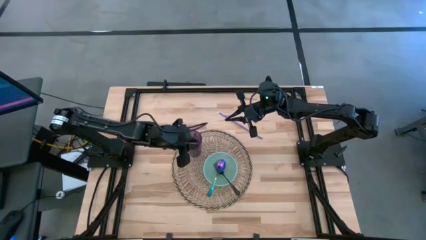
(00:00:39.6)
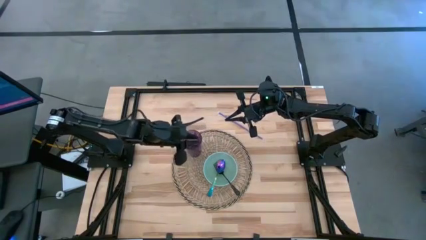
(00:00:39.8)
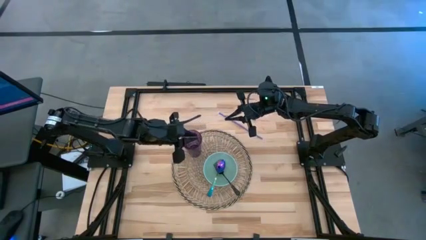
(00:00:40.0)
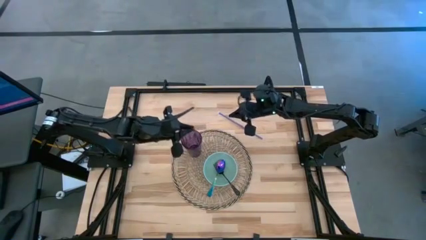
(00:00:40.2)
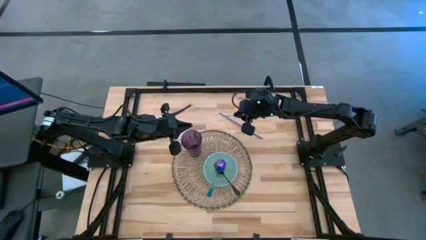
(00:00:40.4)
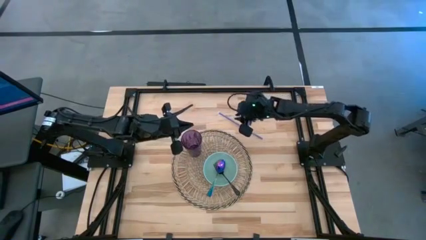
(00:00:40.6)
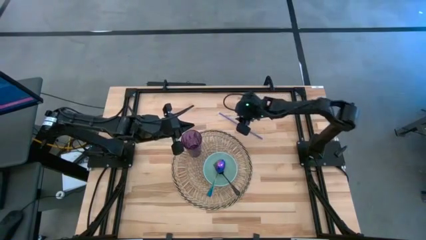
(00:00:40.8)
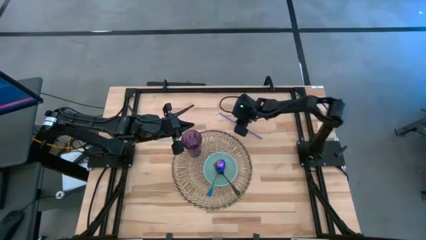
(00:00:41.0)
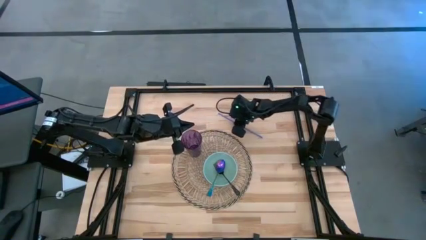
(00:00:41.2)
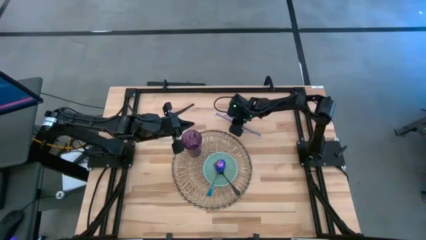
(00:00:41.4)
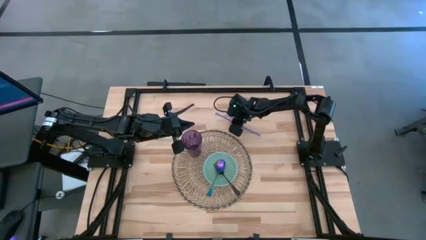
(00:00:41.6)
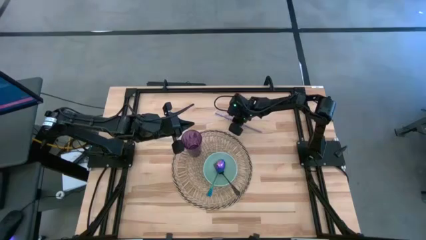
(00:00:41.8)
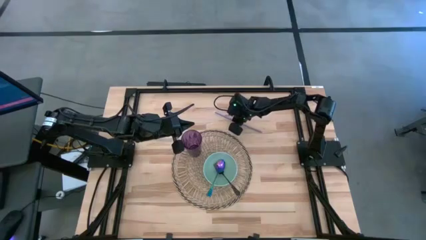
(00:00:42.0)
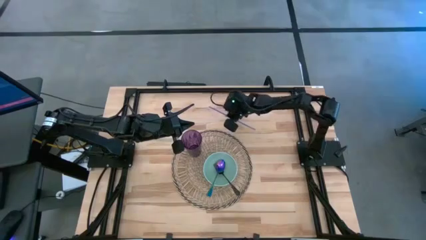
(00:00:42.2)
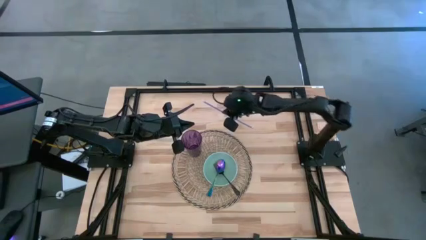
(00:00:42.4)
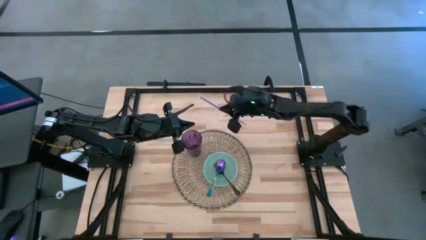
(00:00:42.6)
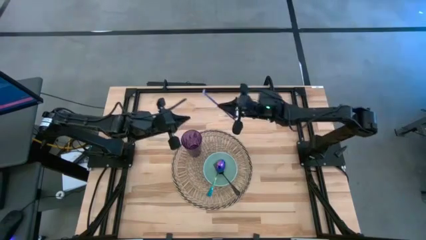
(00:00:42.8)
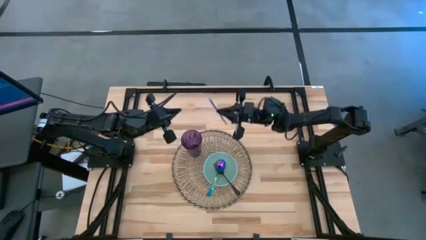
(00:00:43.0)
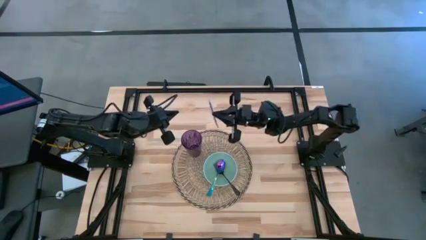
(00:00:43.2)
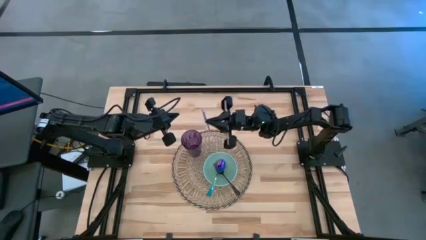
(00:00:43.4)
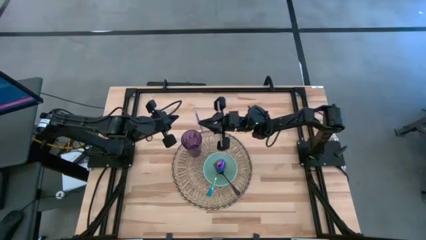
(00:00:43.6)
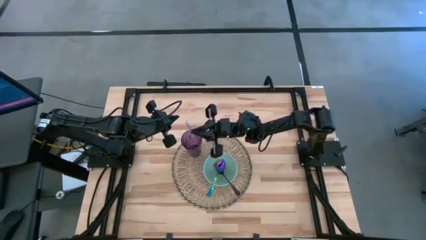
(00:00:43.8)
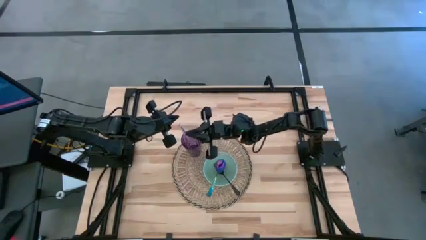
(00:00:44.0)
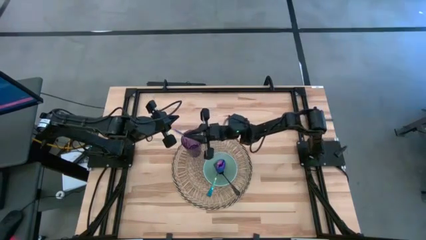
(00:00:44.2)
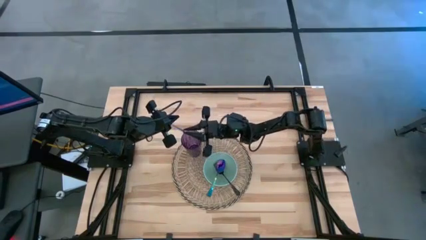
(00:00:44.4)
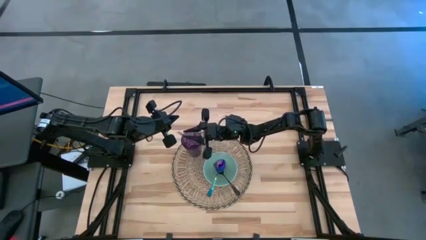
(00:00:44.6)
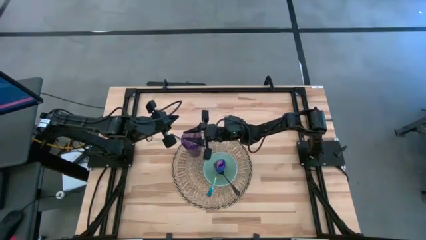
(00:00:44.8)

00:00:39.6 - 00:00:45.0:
Task: Pick & Place Utensil
Put the purple straw into the purple glass cup on the table placemat

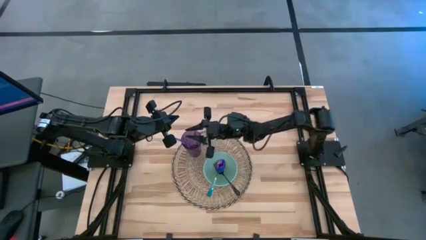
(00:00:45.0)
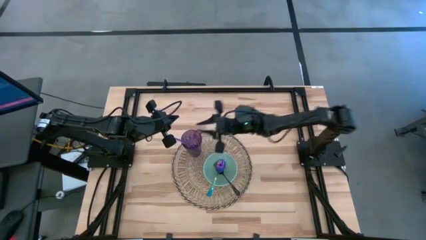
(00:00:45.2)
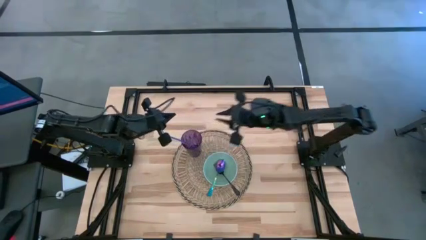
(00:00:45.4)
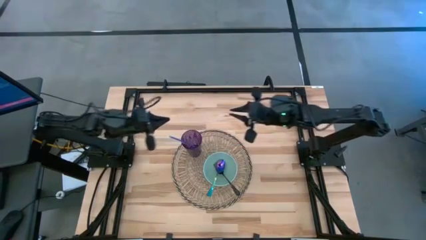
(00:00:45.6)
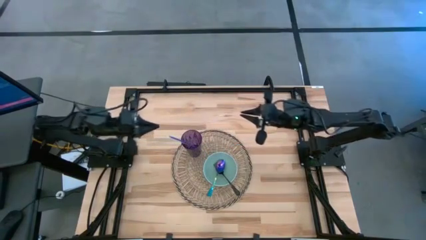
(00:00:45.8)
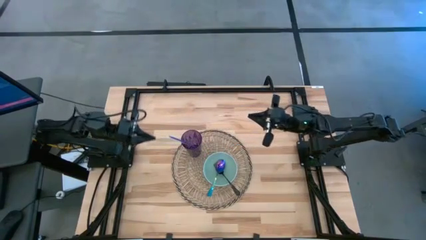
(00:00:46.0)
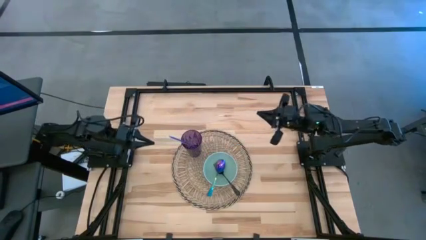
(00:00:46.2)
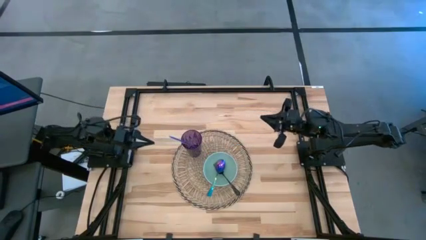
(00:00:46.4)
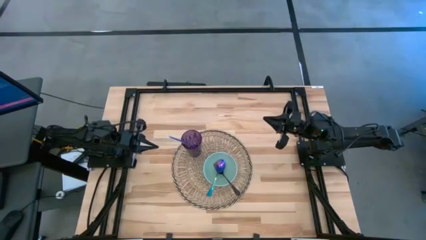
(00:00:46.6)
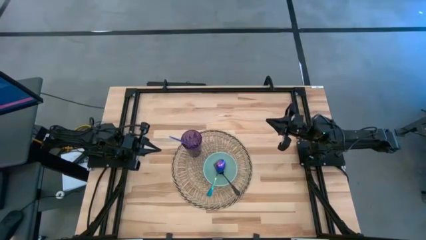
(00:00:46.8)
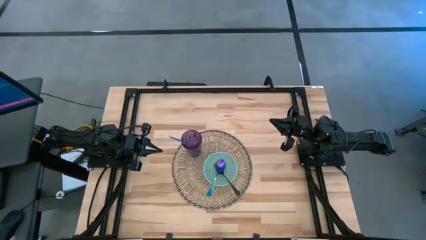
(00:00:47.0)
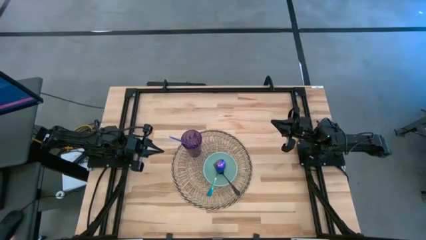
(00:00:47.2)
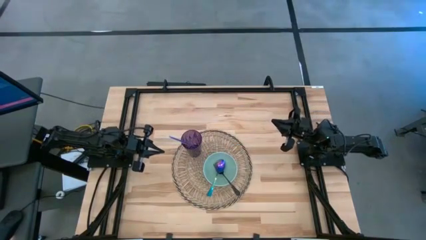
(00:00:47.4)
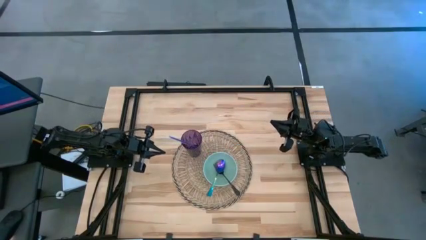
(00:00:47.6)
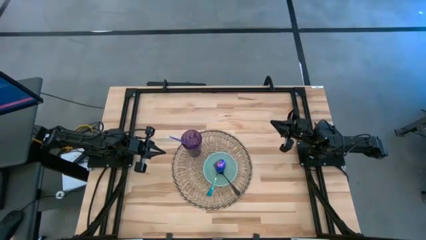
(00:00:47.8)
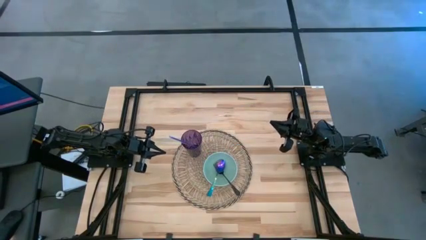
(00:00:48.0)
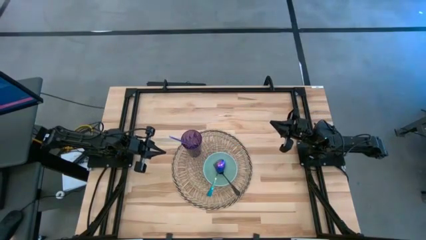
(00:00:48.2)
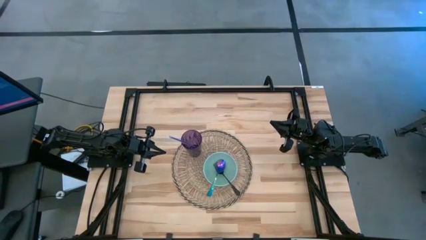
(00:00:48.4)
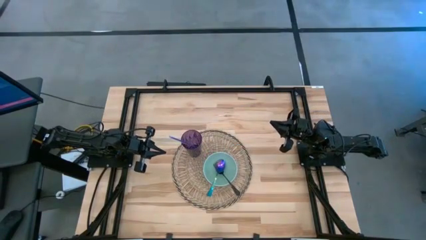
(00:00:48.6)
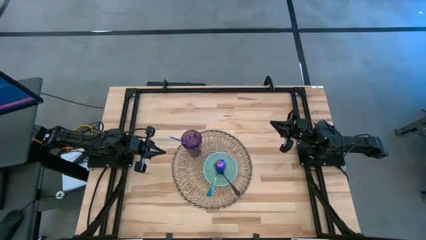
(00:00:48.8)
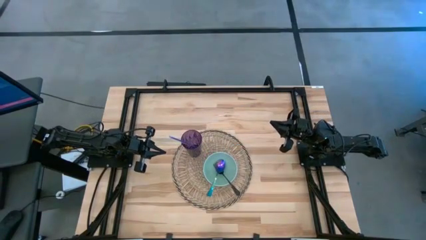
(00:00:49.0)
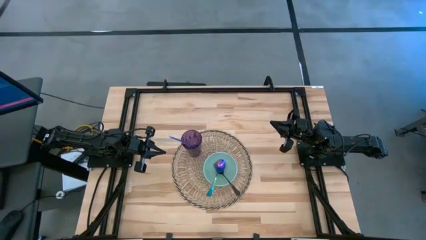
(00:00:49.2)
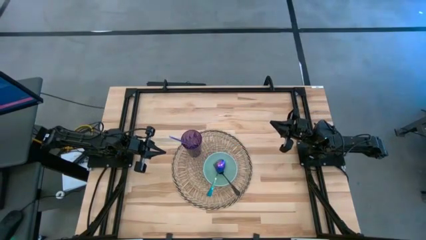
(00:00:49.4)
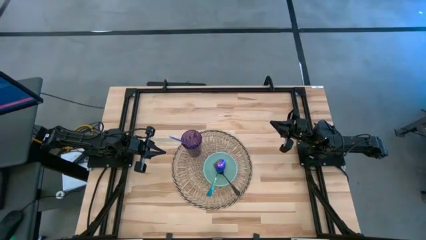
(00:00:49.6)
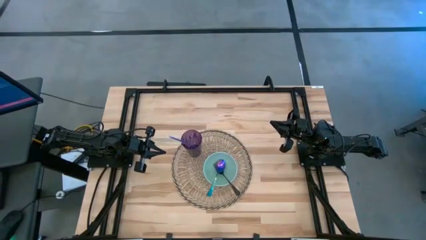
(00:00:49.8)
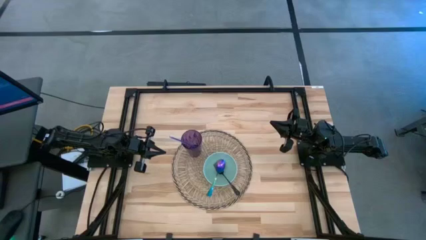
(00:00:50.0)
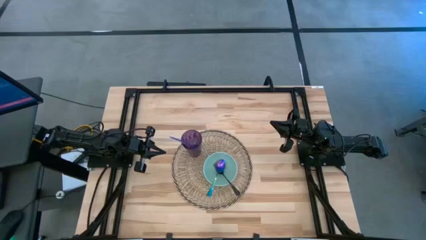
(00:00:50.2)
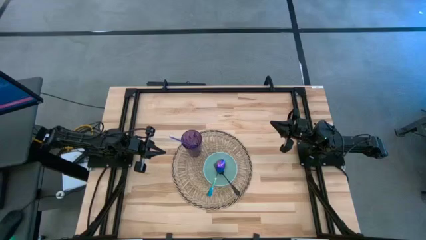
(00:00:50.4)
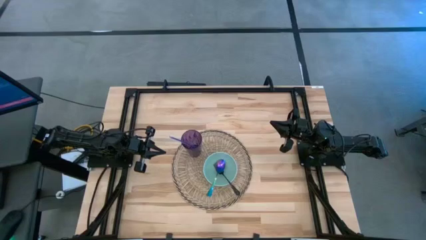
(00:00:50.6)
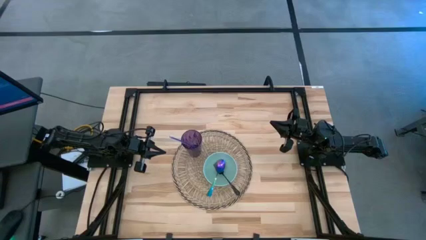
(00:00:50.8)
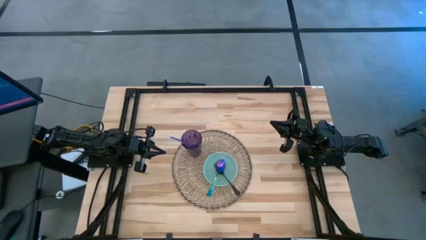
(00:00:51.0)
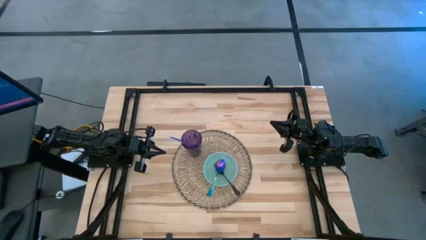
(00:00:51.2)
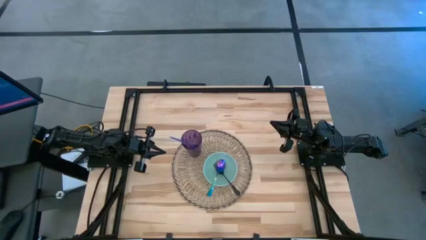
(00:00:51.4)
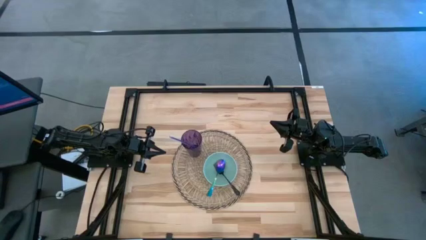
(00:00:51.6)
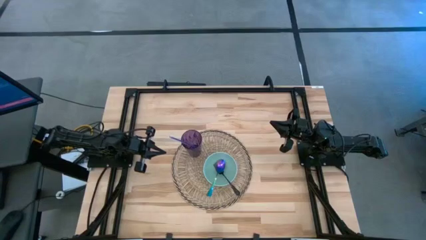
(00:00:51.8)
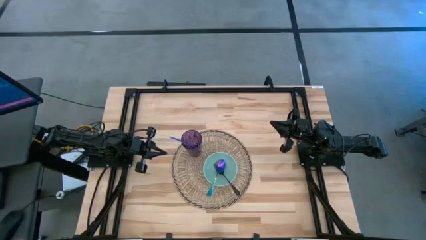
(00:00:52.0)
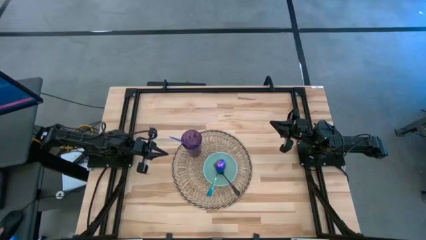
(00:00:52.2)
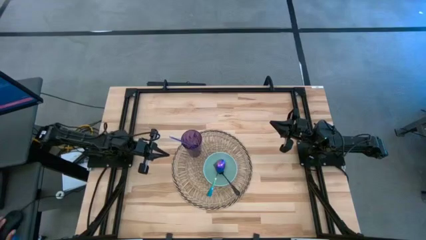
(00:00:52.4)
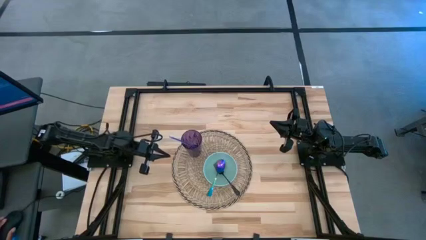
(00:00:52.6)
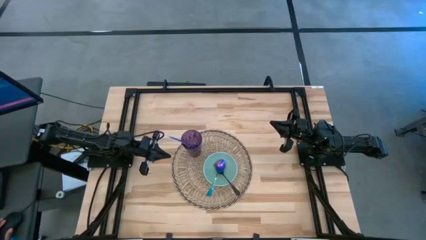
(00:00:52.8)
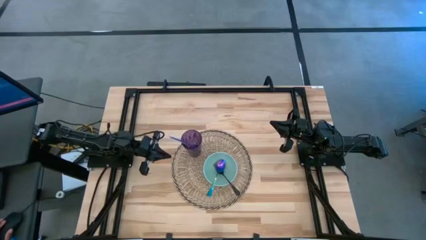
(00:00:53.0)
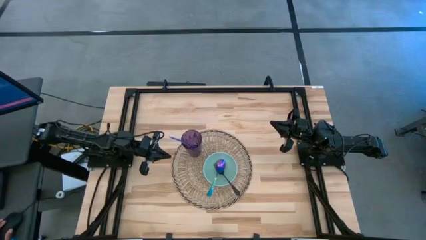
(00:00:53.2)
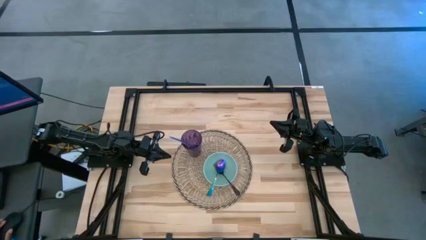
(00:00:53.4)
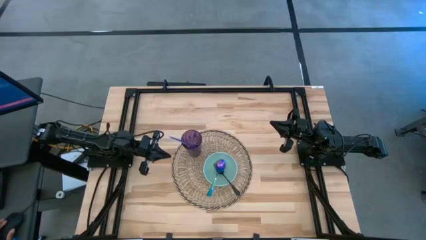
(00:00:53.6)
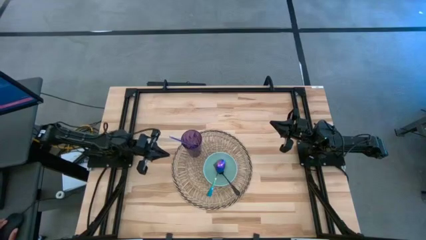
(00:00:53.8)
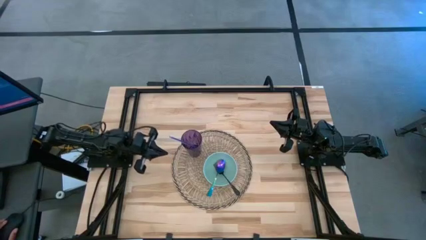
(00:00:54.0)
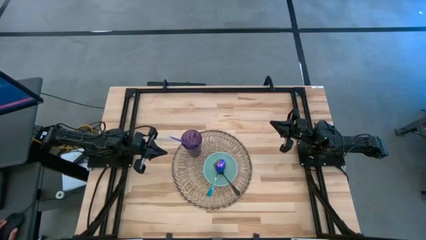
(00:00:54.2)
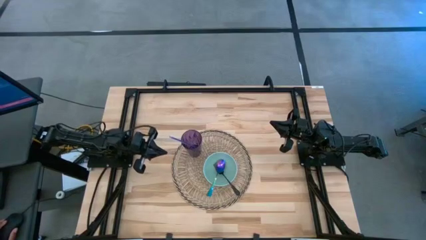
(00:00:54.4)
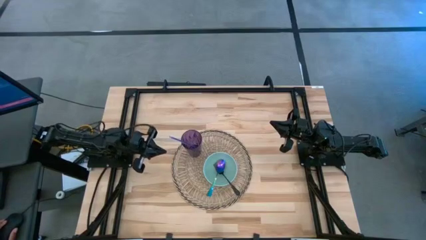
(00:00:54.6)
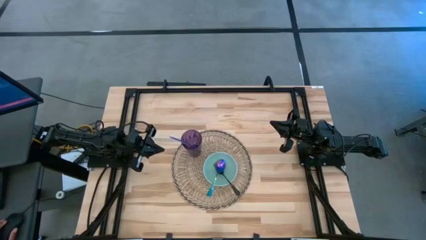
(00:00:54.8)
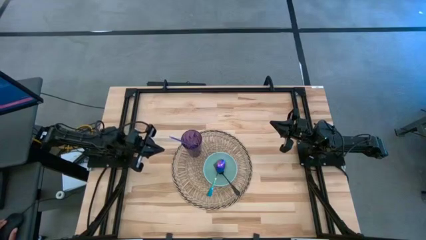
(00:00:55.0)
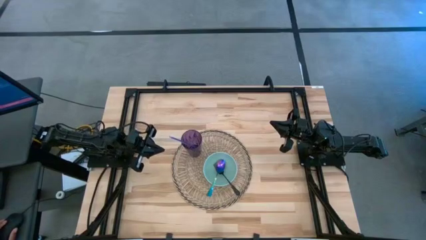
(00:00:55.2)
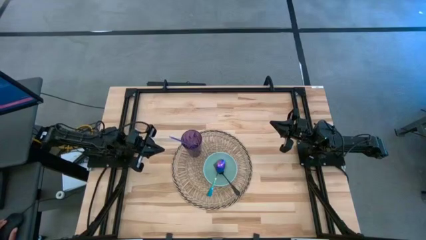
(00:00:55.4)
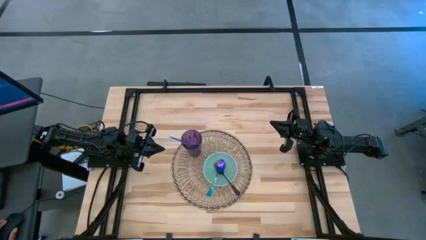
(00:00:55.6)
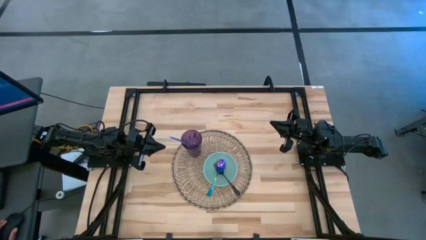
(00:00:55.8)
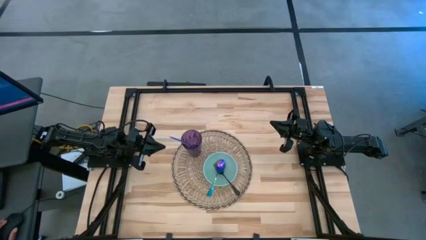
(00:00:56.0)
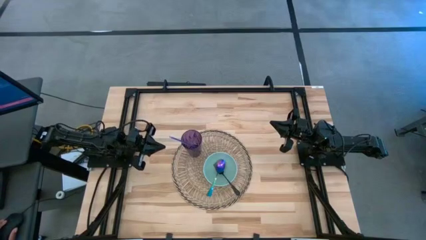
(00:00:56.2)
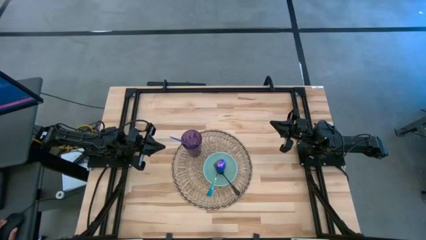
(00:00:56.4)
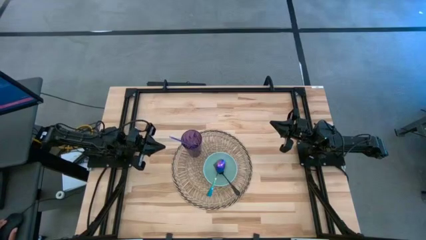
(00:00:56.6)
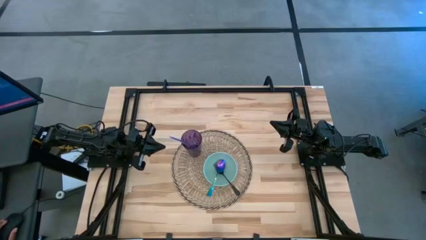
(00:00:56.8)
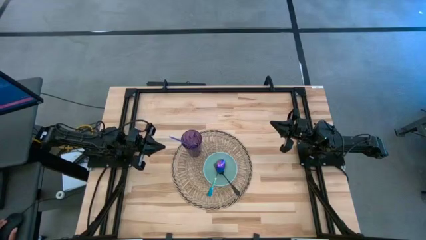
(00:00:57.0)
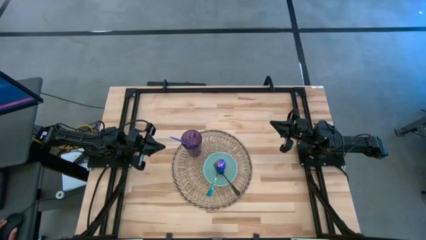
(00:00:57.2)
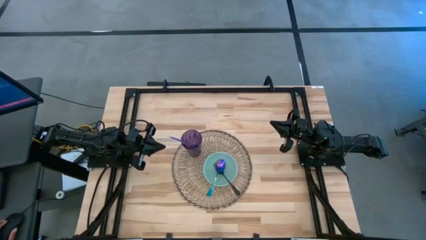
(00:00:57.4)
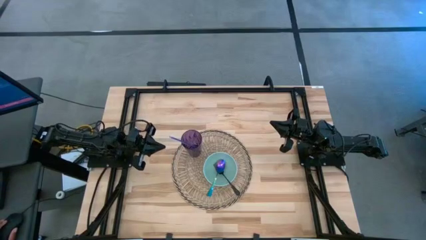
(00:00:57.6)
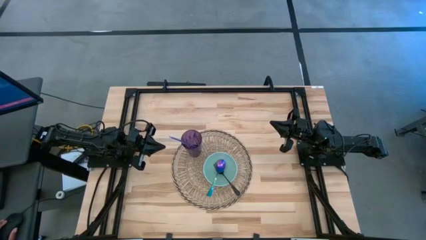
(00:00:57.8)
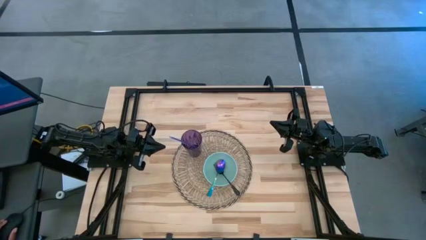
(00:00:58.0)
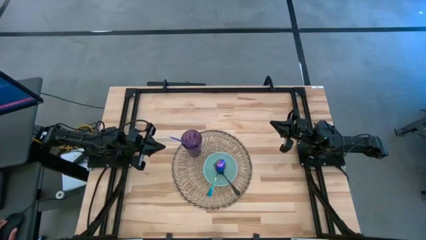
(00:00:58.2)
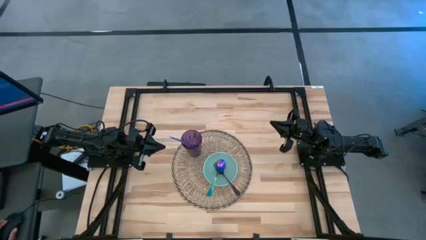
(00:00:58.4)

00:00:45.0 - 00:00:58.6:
Return to Home Position
